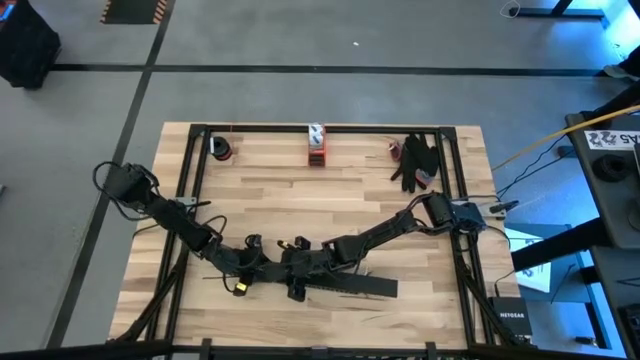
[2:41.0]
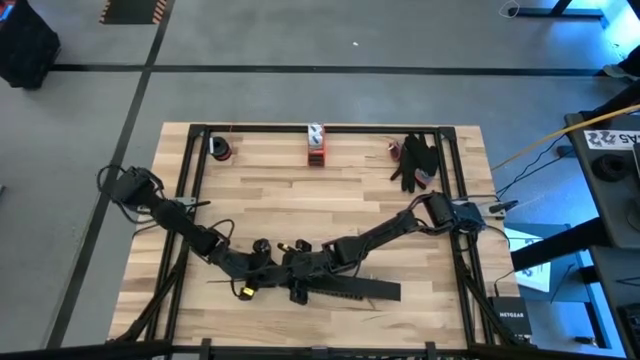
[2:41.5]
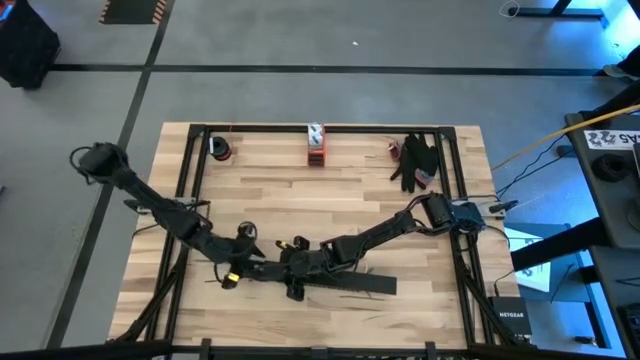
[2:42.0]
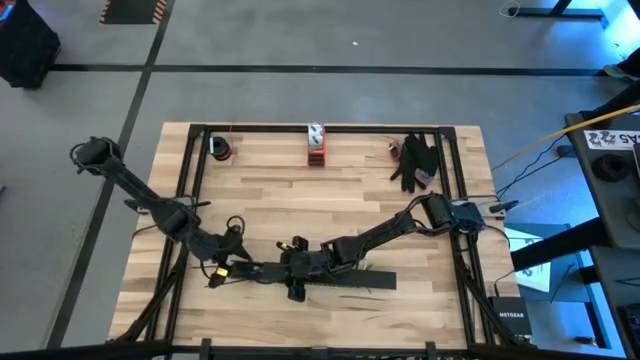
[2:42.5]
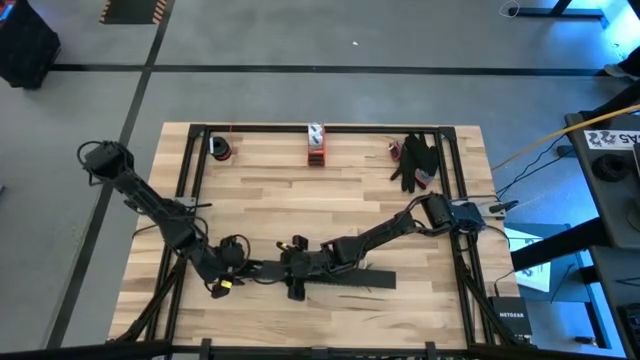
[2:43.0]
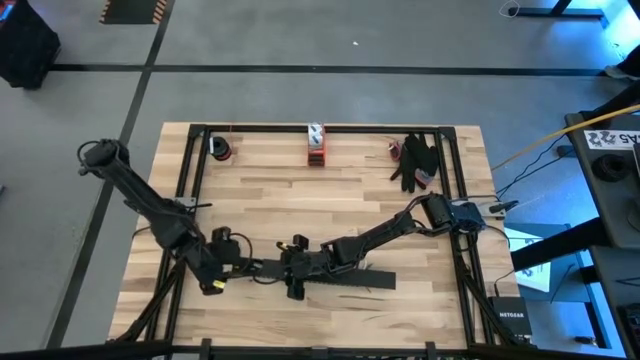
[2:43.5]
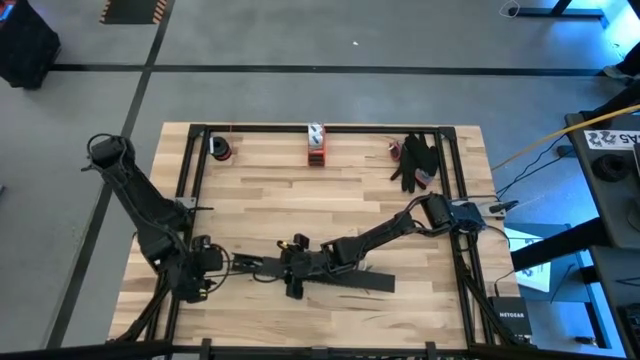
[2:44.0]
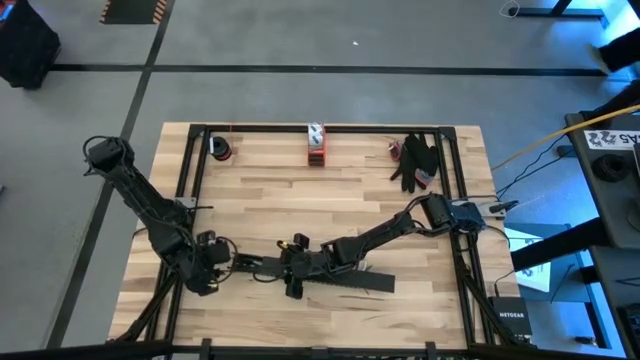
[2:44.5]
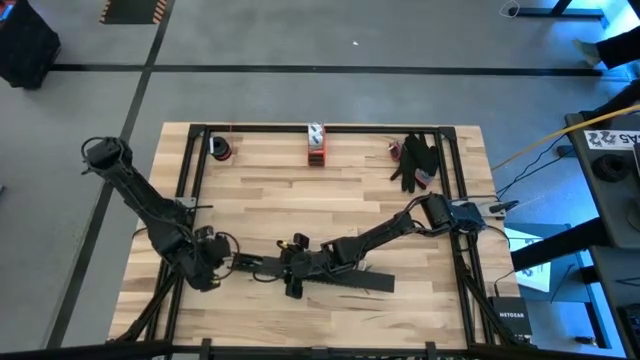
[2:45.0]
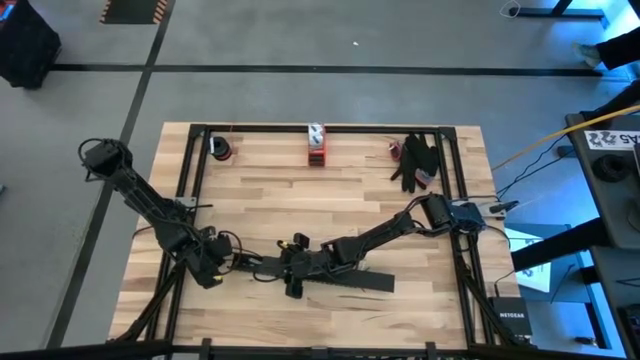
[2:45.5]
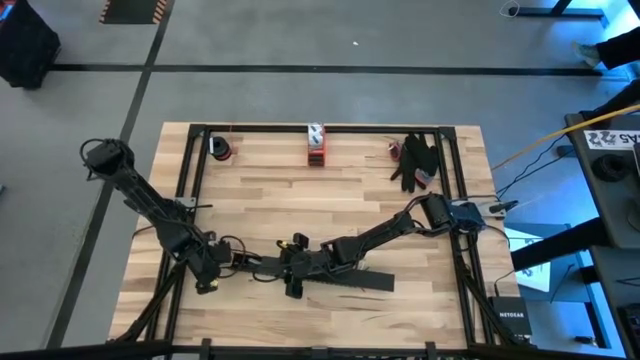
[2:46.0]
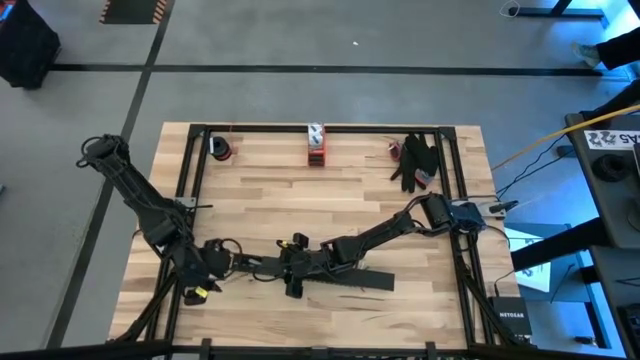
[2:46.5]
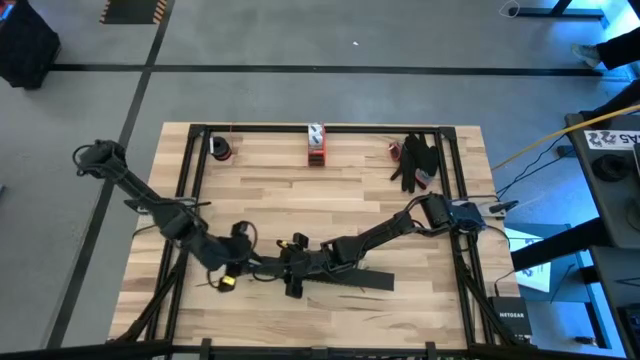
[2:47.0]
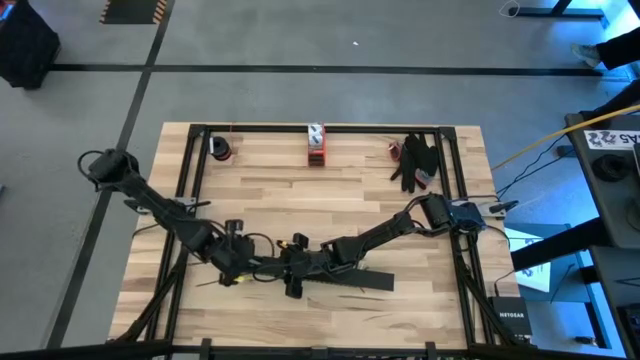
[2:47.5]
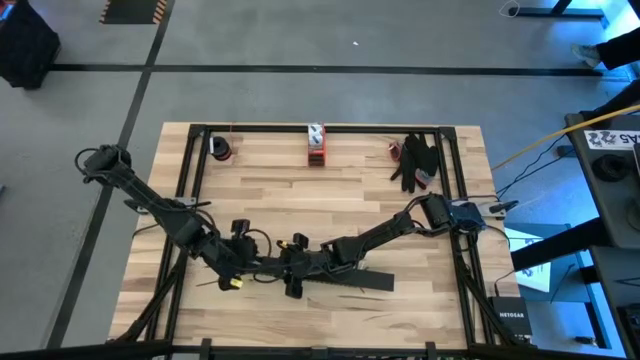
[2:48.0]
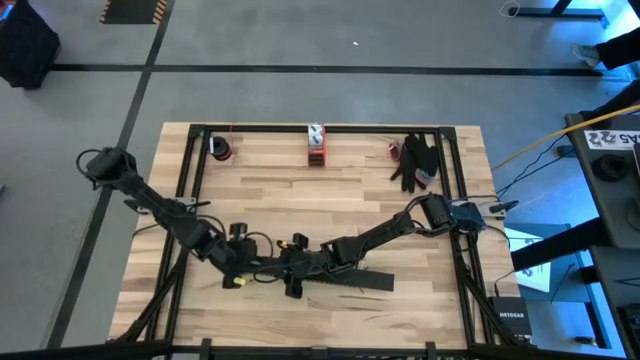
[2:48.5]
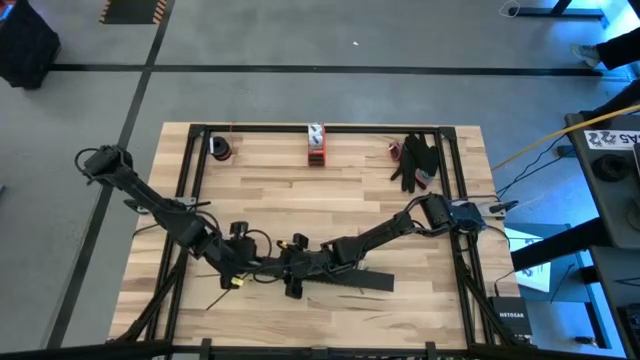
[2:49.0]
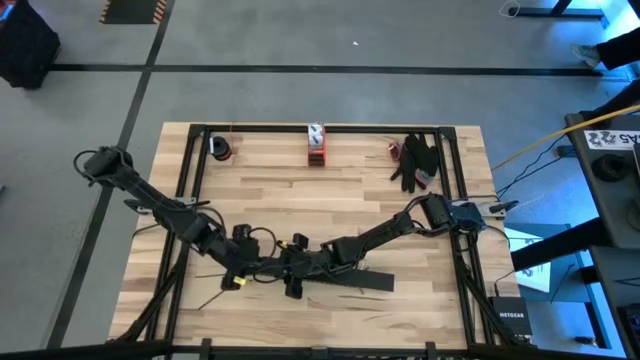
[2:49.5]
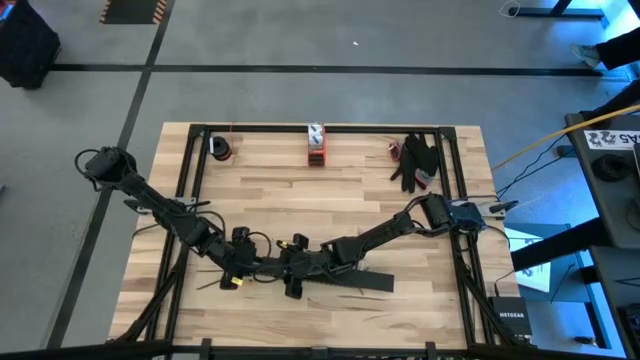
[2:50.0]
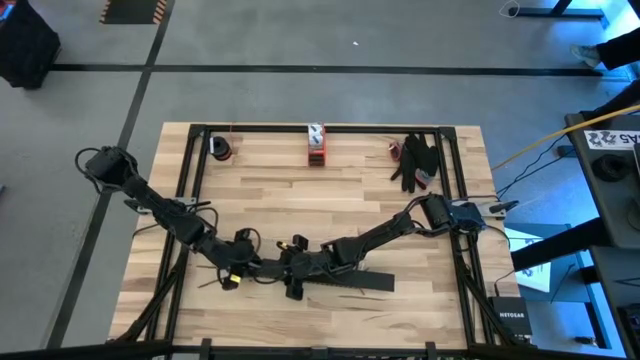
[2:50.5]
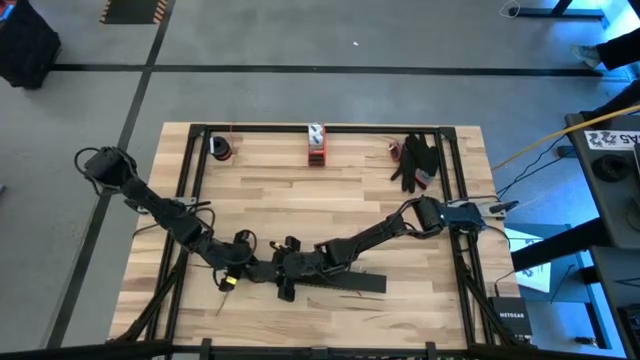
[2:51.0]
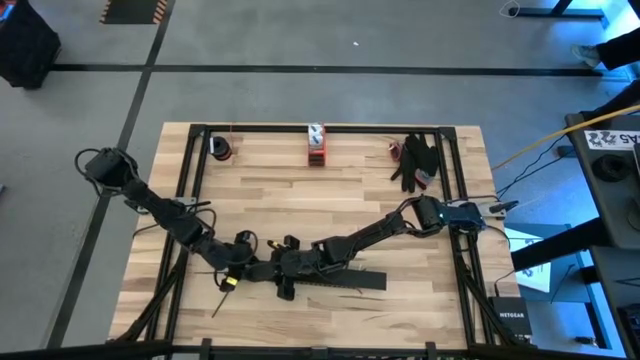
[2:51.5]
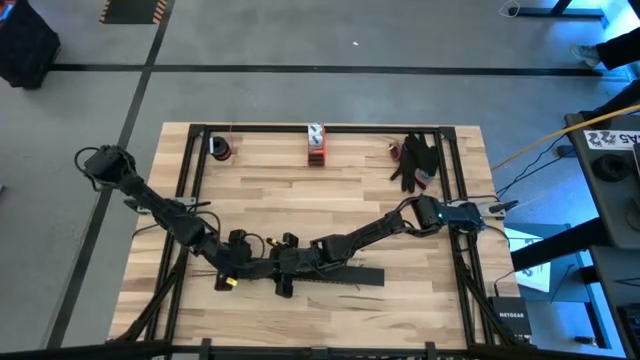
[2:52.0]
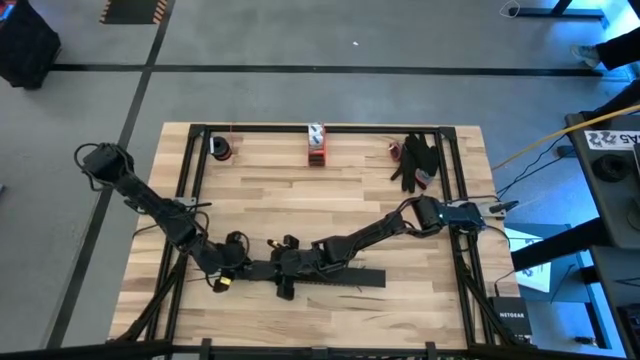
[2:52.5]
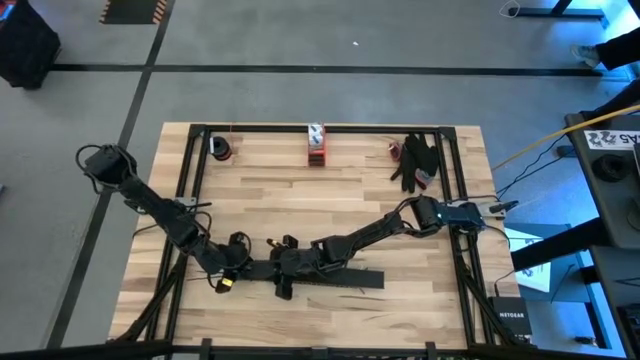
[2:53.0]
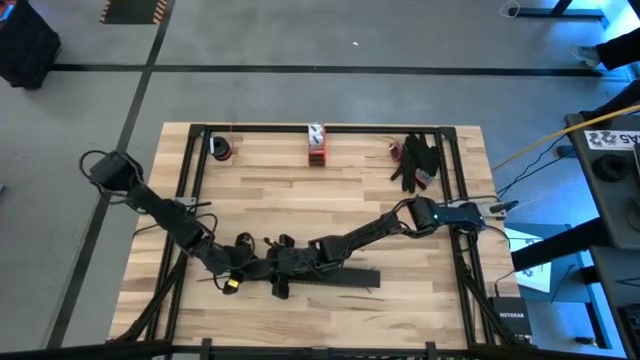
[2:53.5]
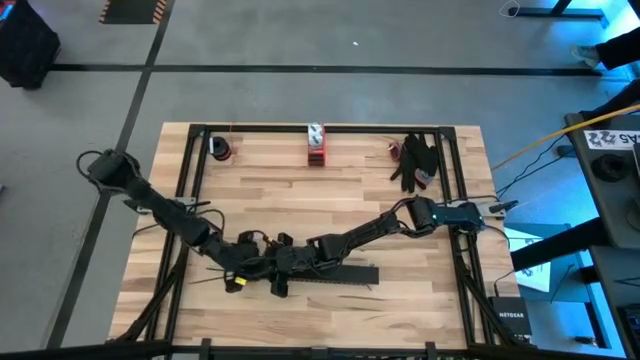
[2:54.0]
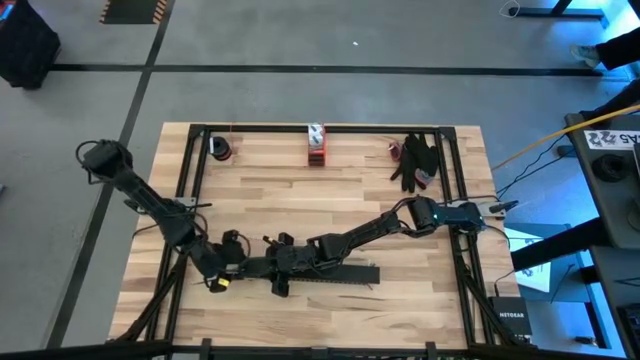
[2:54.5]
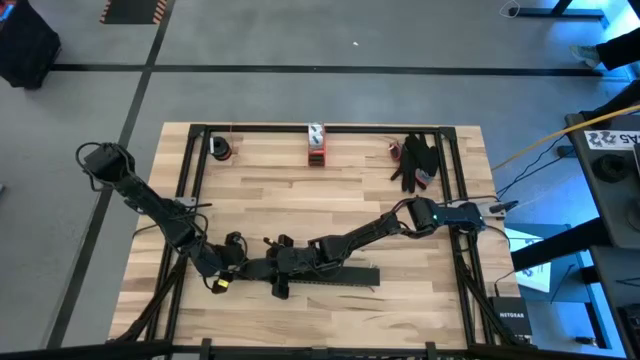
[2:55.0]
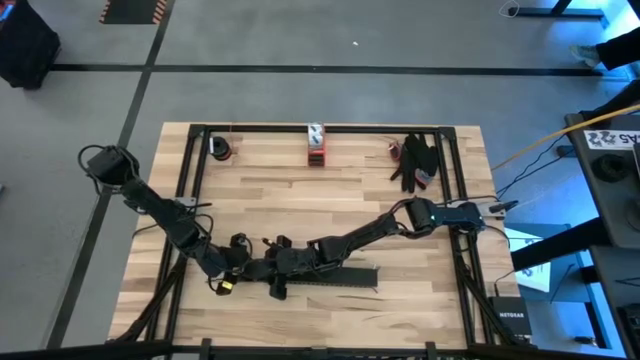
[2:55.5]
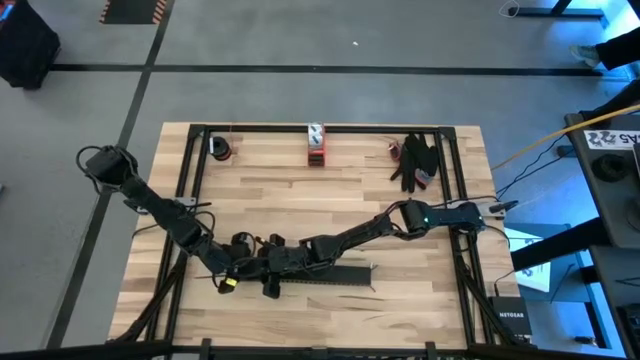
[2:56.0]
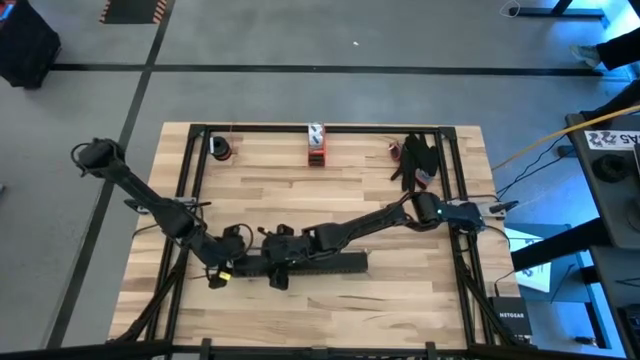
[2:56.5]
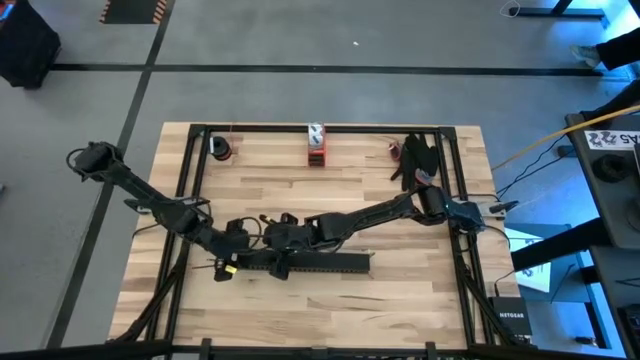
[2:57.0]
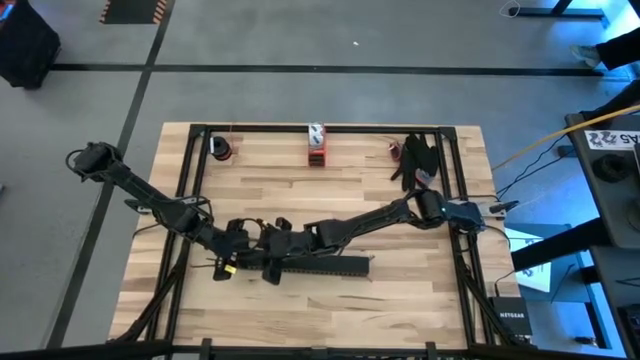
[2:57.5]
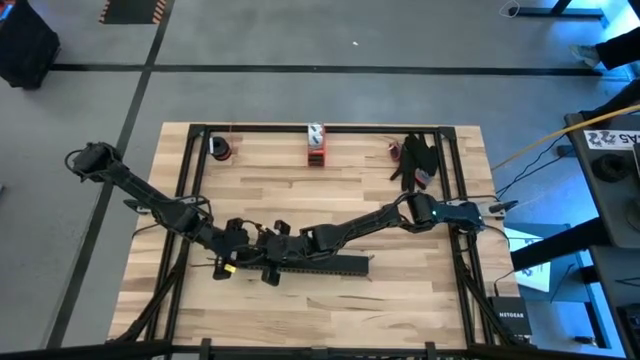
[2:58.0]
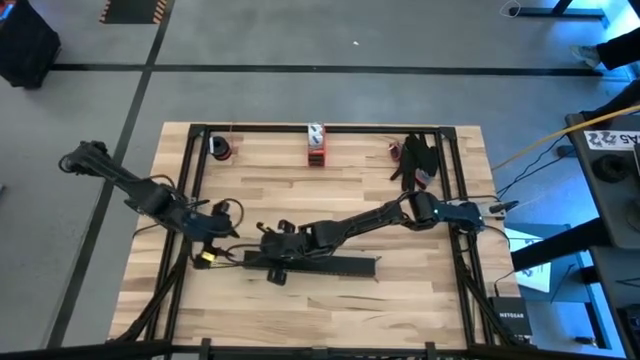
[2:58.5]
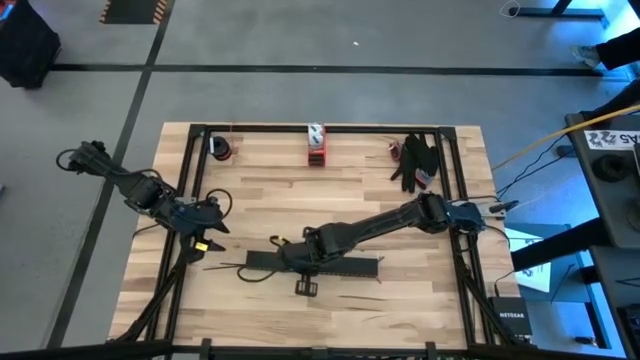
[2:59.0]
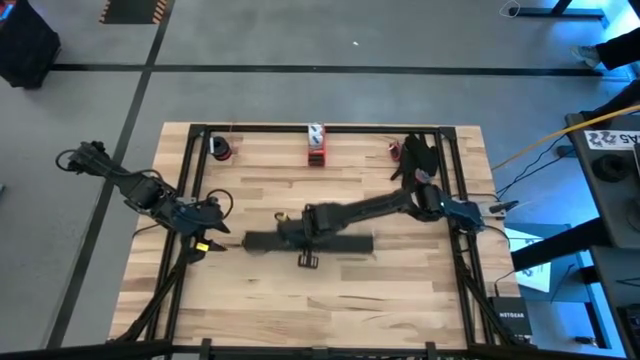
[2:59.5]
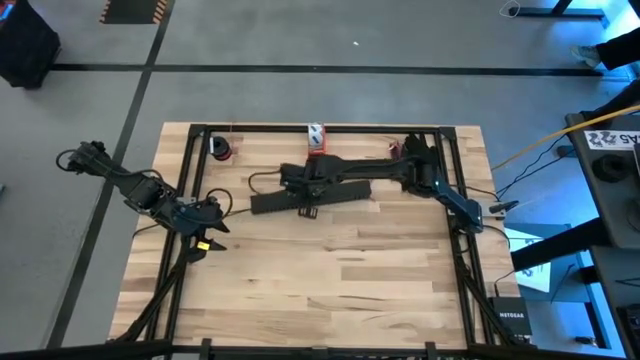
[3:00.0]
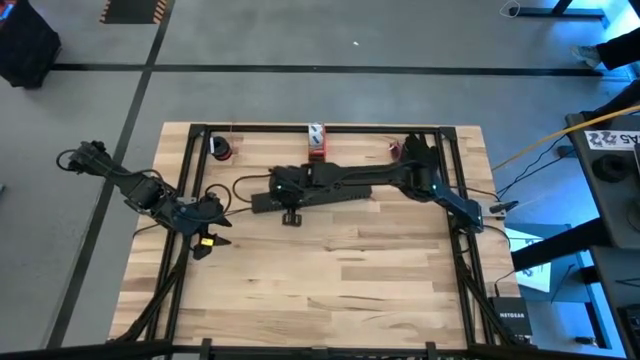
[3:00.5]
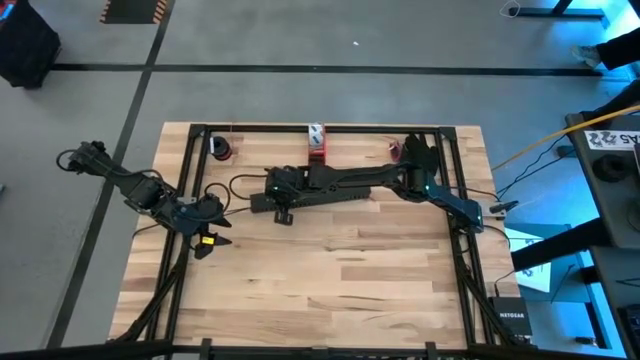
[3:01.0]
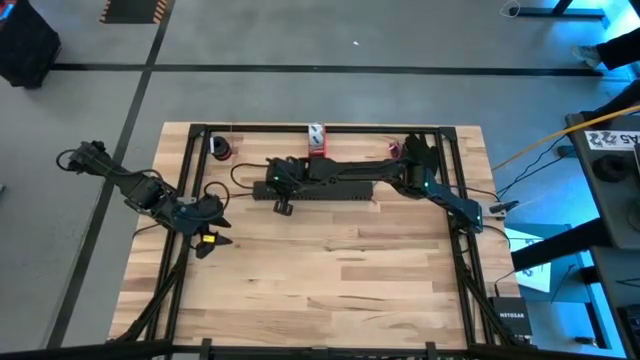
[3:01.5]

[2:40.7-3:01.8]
Task: Ziptie cables
Insert the black cover of the black cable duct
